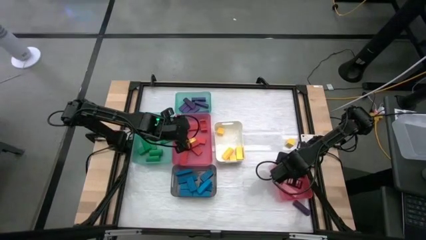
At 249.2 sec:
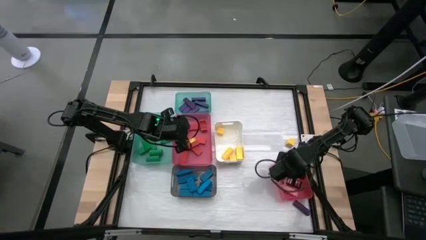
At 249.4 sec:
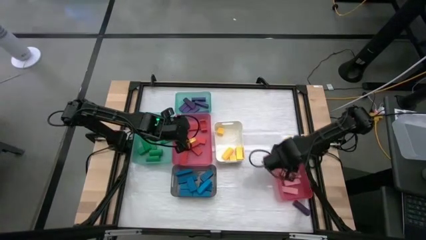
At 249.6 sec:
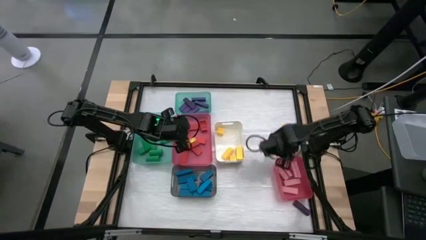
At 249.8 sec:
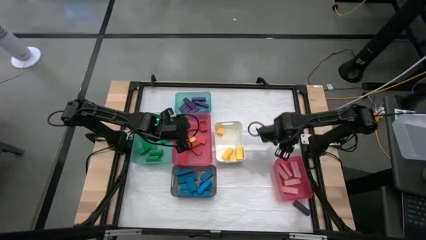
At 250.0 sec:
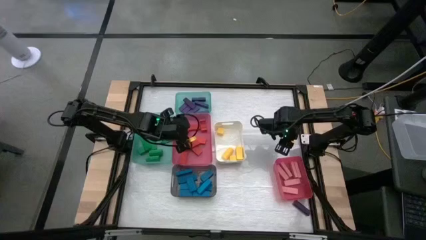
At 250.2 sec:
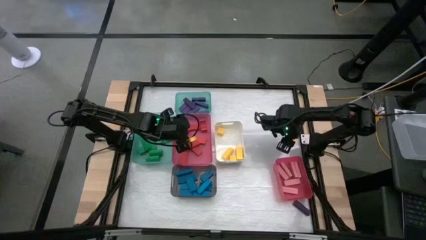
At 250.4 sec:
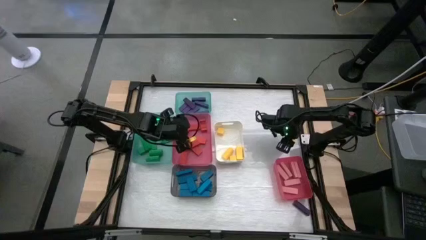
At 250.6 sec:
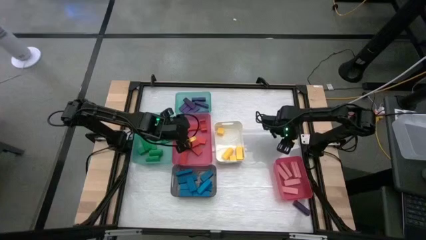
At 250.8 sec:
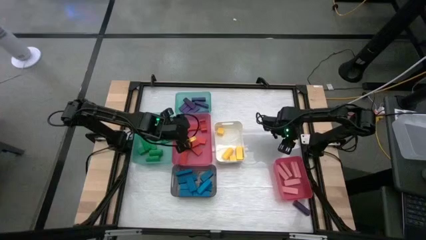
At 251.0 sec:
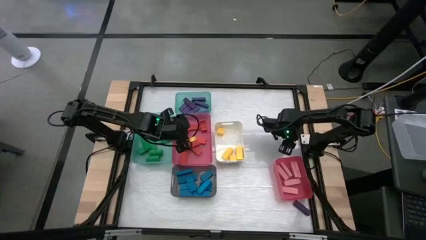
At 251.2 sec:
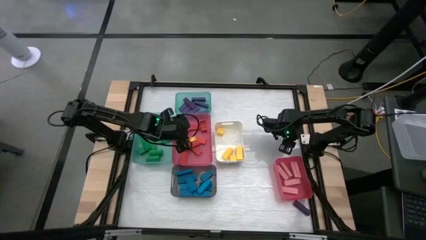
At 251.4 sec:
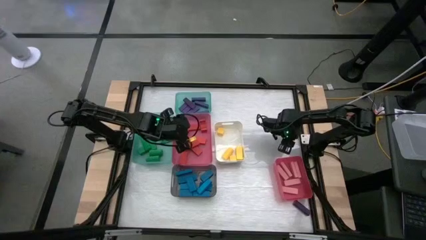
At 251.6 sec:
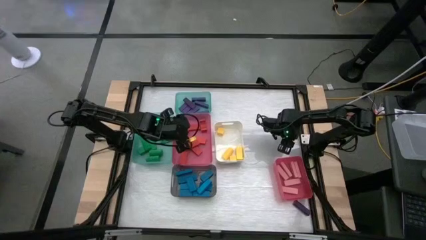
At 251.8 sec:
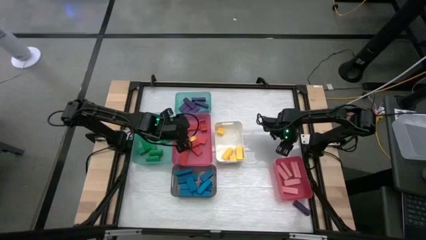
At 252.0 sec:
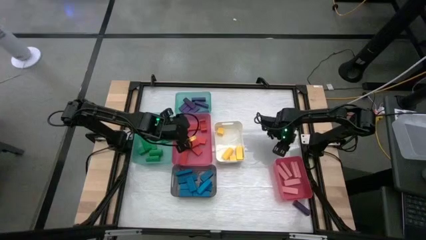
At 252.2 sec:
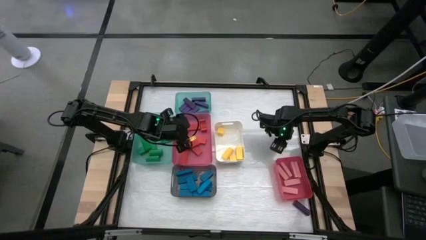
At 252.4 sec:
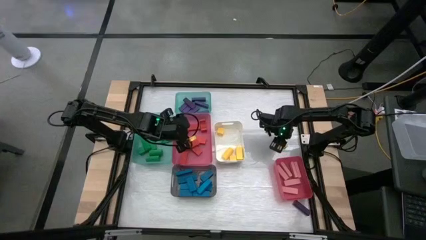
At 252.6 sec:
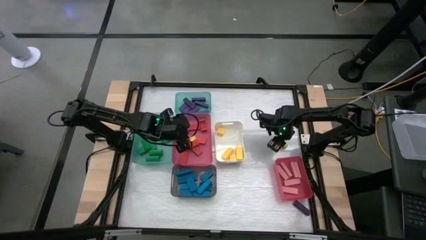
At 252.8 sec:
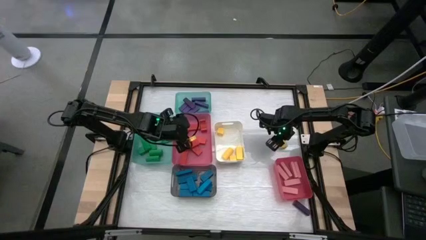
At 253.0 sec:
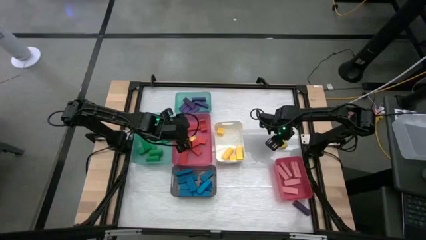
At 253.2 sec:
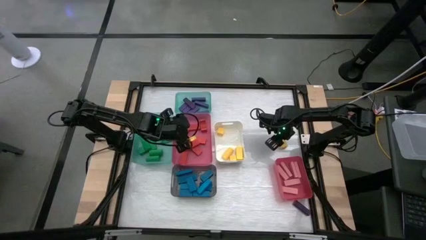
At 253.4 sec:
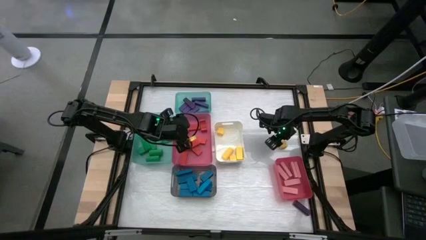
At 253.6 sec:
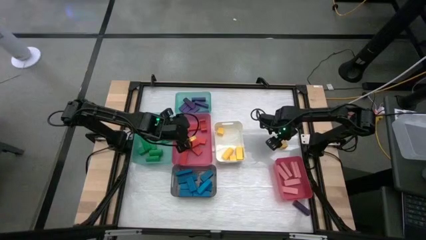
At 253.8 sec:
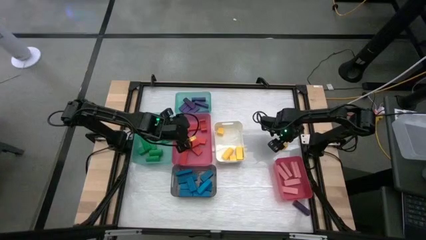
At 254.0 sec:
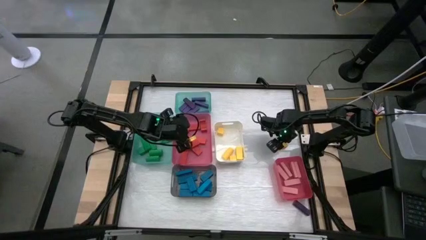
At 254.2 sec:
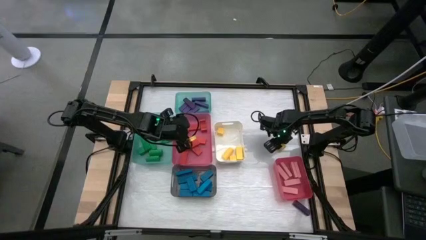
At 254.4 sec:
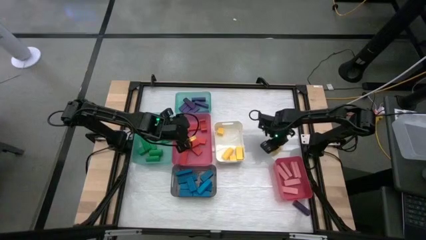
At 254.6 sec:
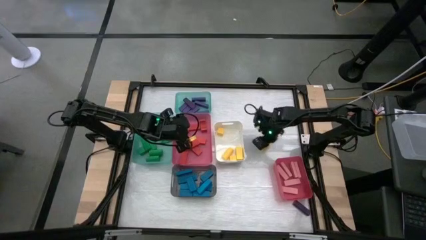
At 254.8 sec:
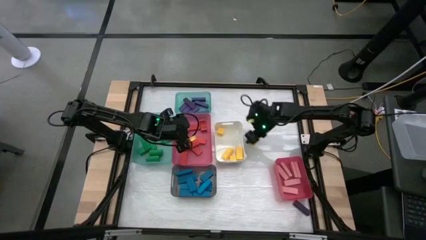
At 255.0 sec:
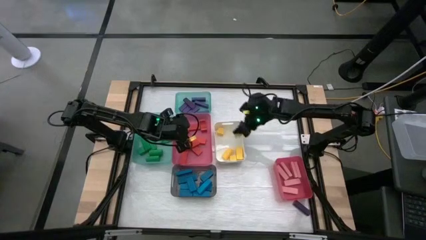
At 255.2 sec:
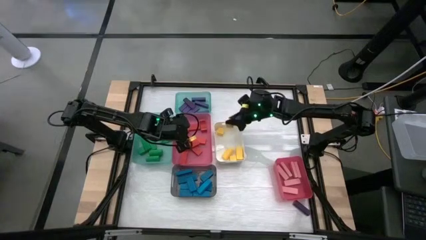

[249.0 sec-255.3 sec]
Task: Sort blocks
Put the yellow block into the white bin

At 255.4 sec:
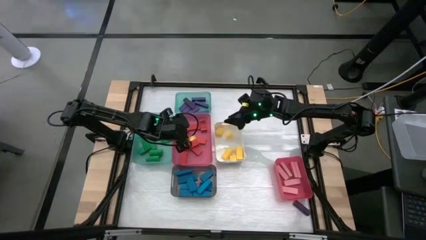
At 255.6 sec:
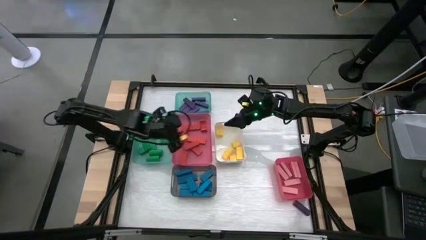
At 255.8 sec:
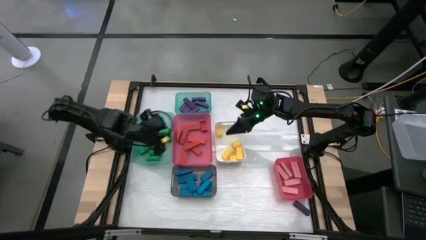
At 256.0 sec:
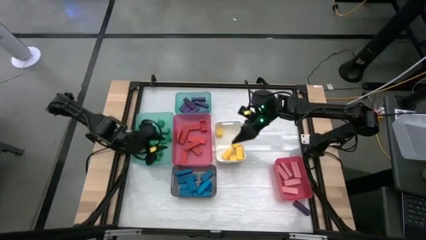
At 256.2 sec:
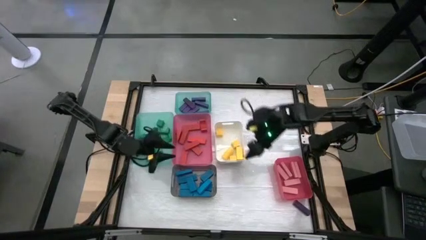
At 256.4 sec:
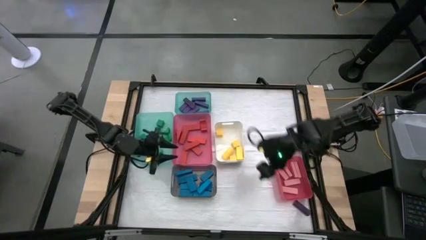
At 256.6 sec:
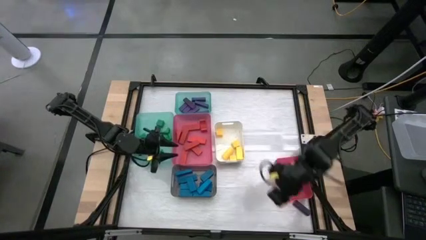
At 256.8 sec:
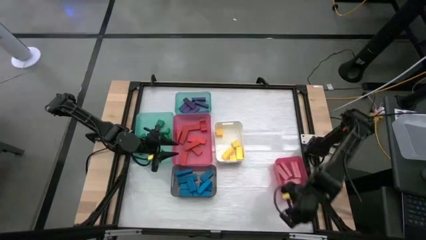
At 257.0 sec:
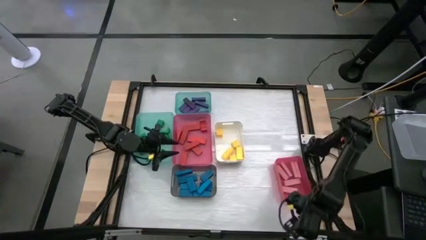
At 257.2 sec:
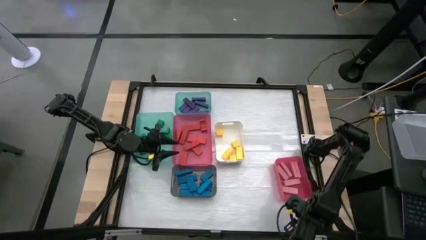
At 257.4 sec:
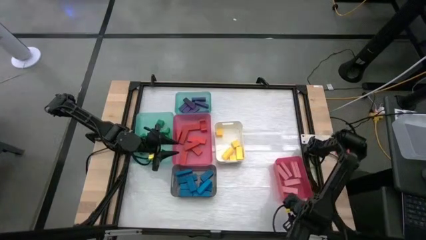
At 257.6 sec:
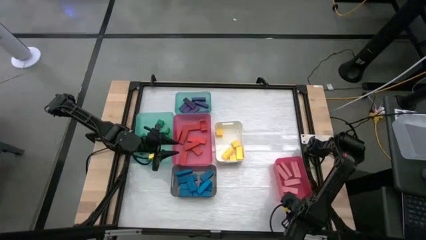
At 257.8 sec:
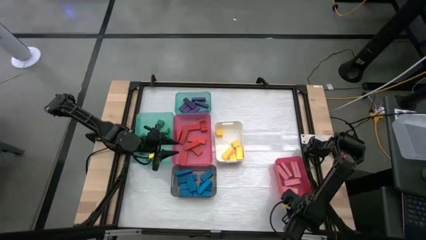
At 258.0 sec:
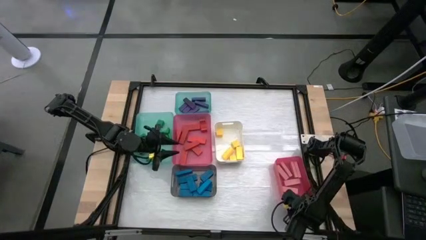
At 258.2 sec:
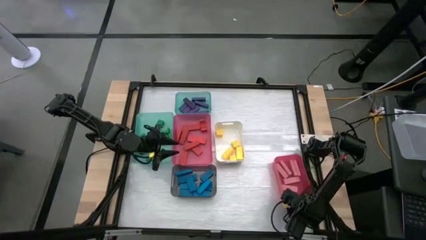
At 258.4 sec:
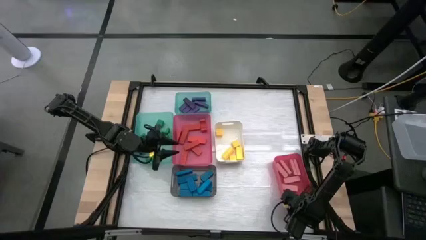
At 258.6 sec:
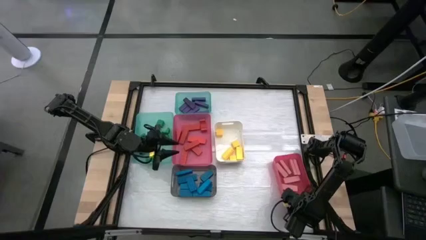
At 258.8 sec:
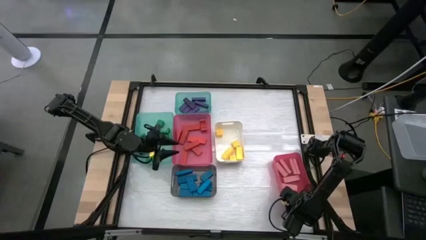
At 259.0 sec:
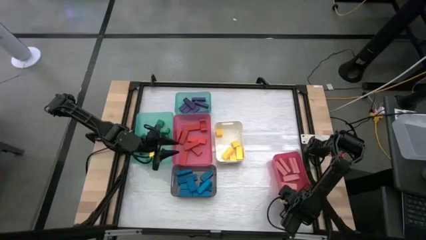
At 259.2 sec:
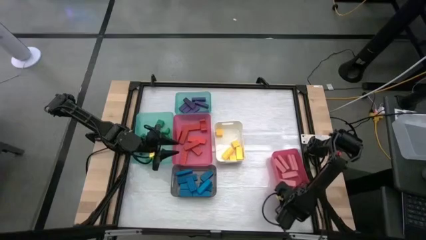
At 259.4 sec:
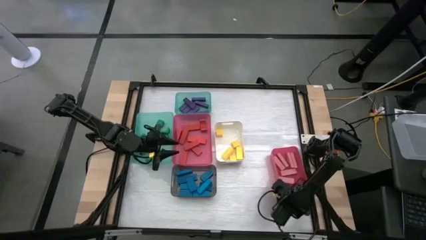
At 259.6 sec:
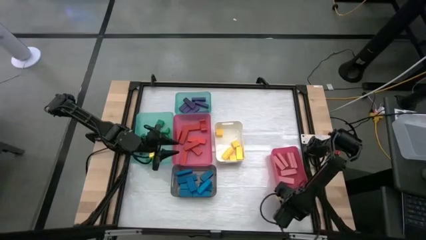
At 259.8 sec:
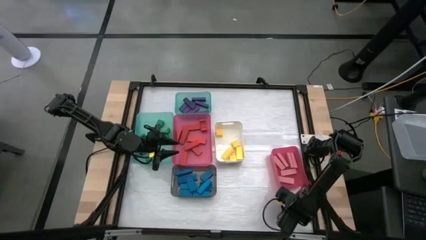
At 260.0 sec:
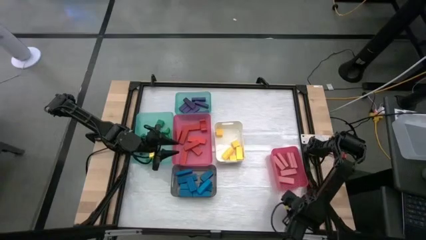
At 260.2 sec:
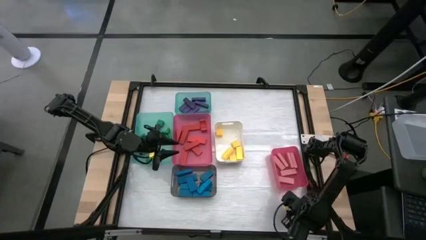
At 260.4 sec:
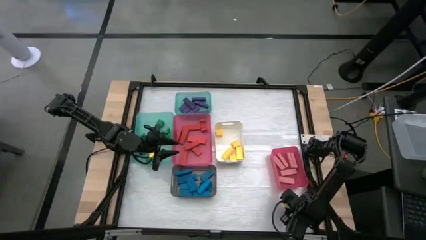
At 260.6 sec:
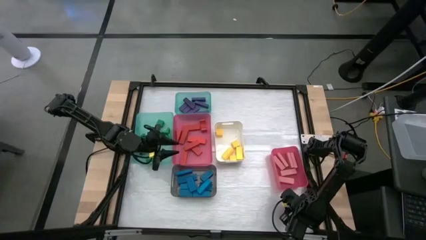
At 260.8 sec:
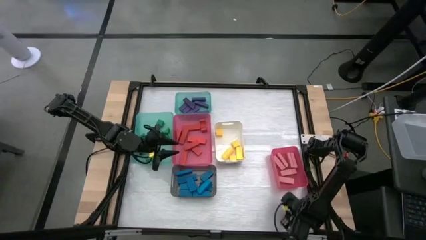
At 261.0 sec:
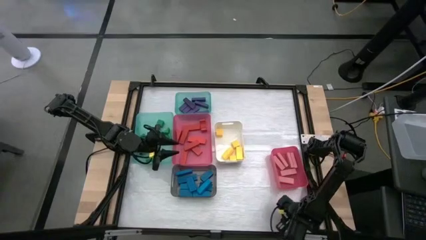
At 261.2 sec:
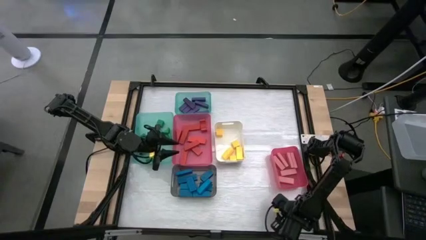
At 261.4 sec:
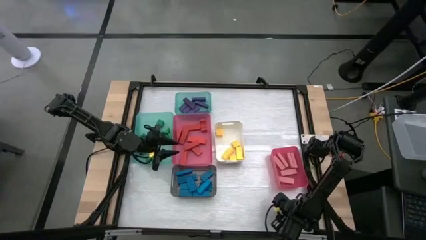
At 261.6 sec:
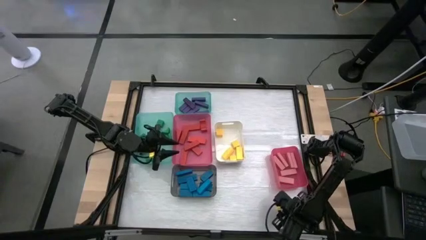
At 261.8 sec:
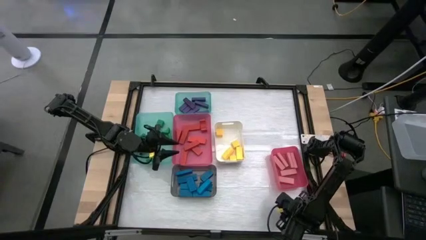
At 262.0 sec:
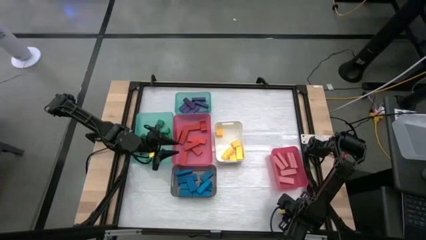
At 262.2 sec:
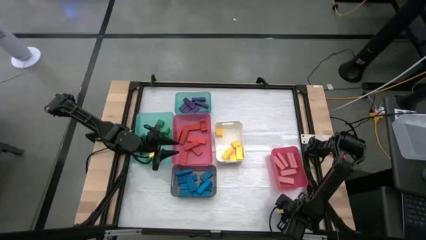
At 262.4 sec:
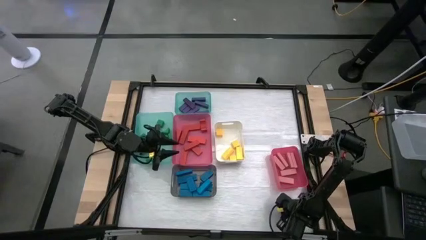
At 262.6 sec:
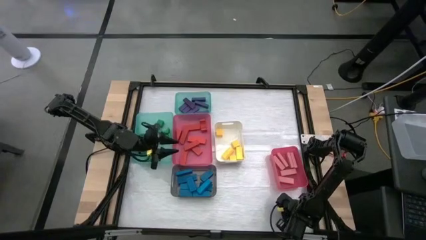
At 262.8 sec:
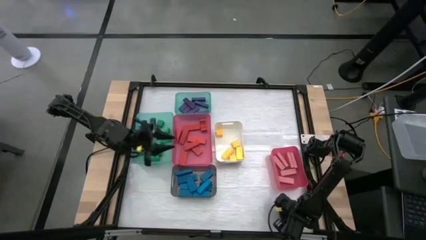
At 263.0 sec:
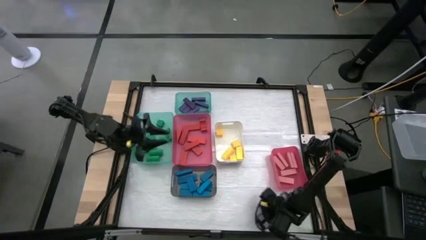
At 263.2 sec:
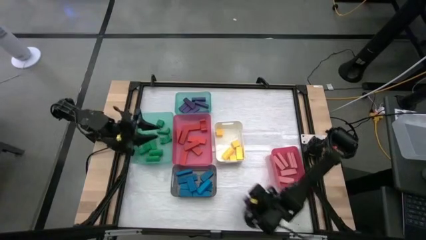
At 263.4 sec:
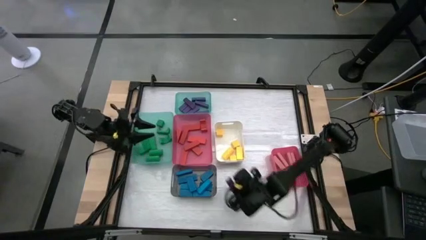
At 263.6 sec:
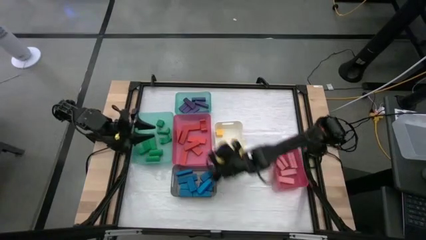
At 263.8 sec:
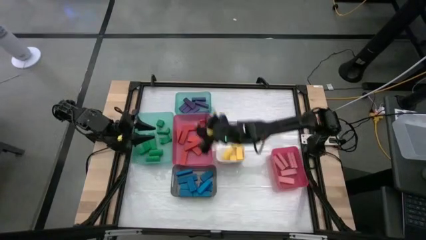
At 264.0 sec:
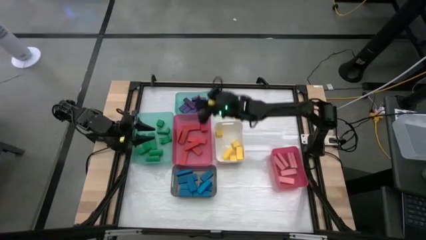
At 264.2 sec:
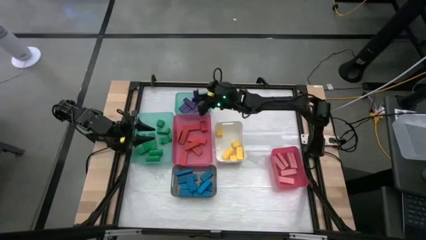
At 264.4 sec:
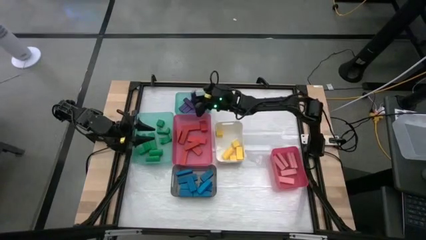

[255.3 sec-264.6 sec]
Put the violet block into the top green bin
